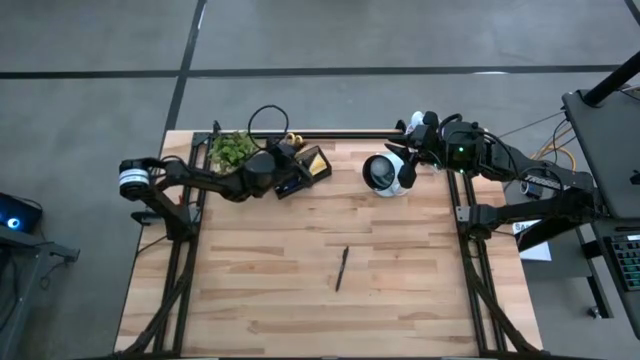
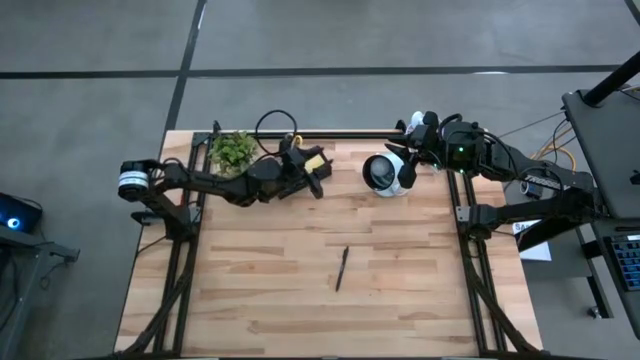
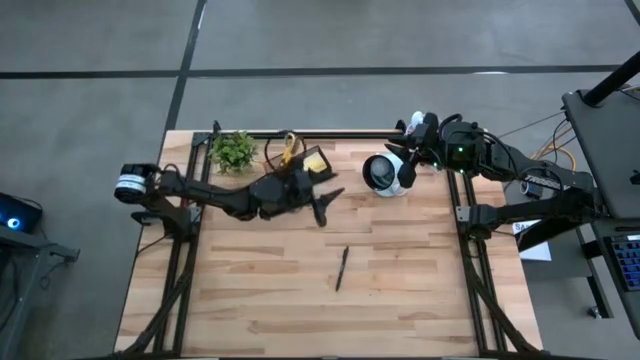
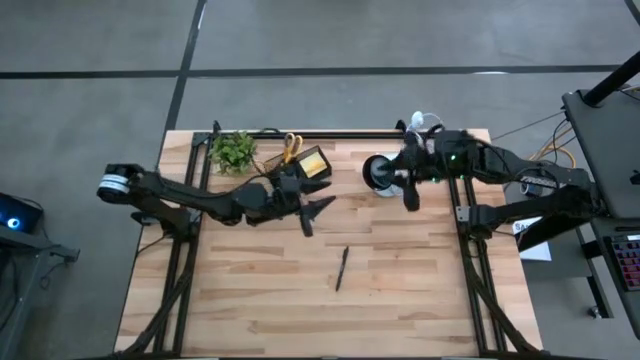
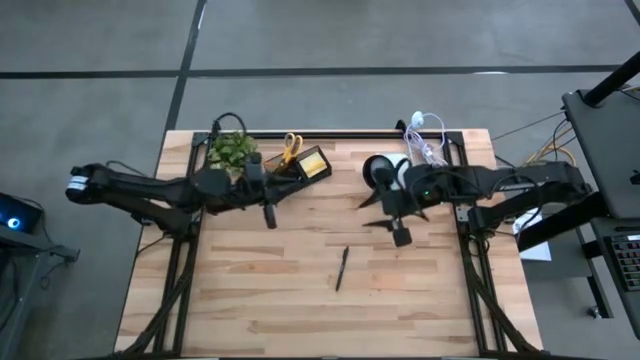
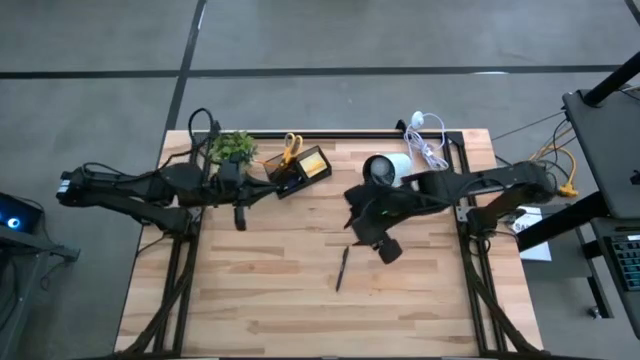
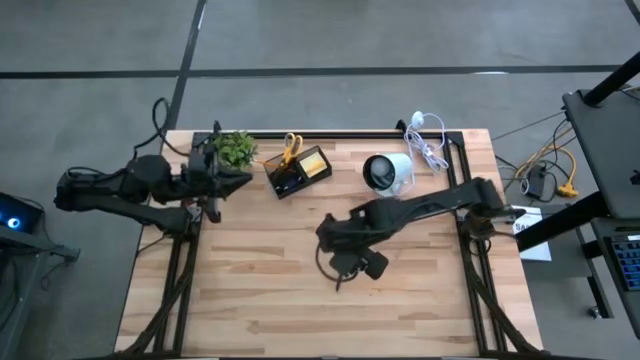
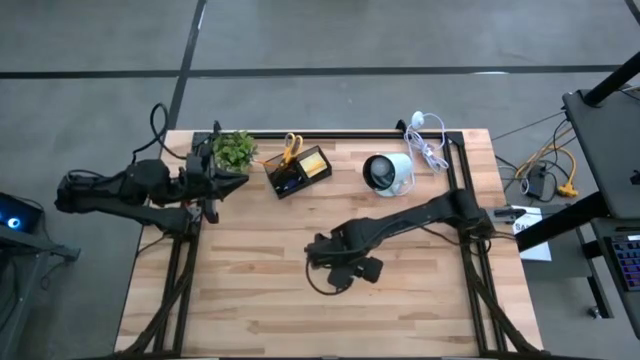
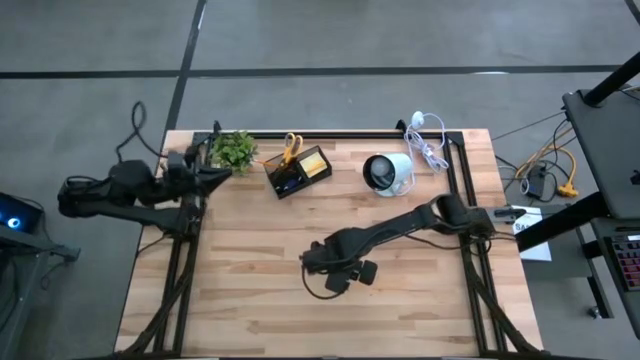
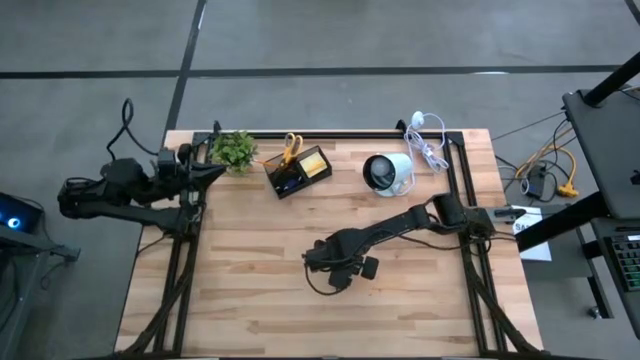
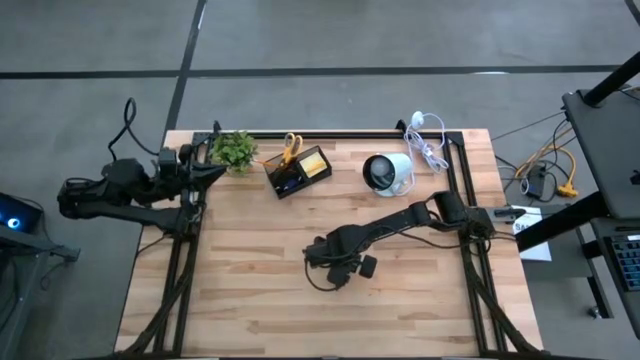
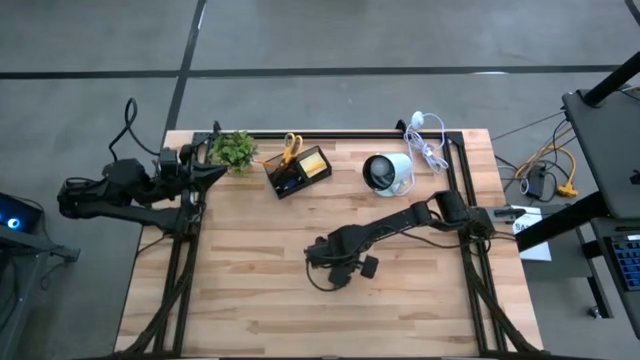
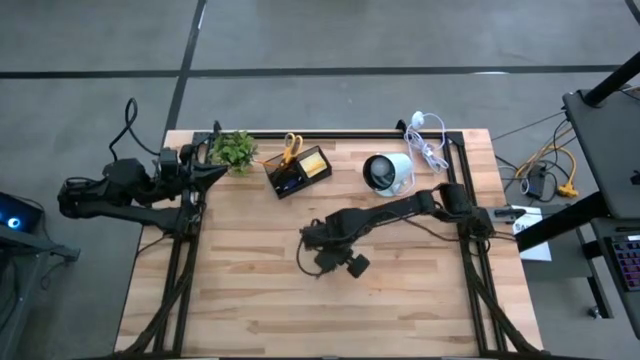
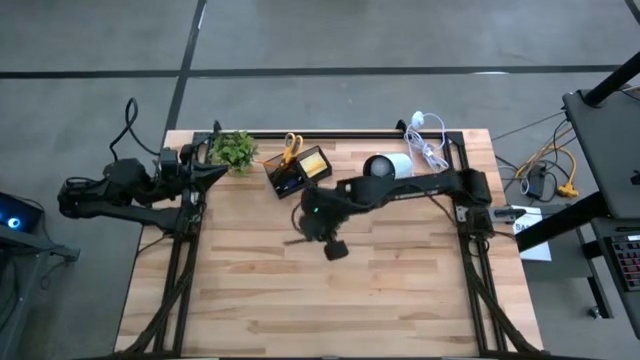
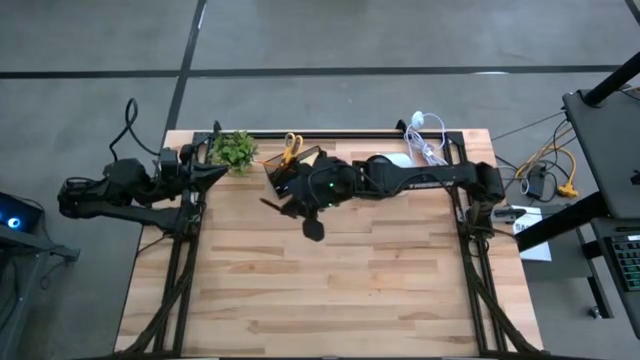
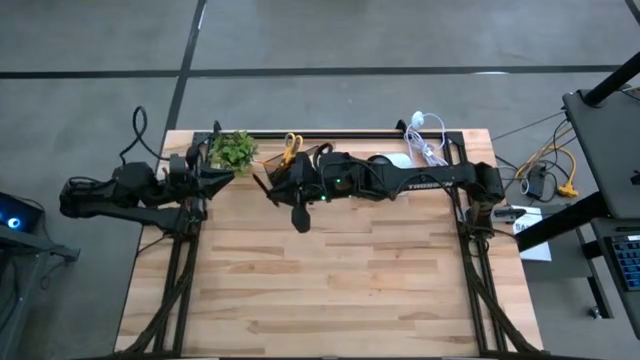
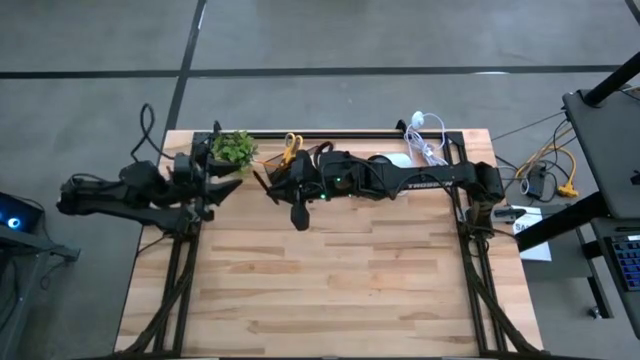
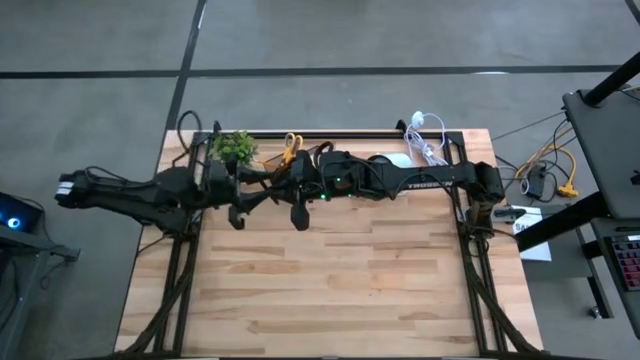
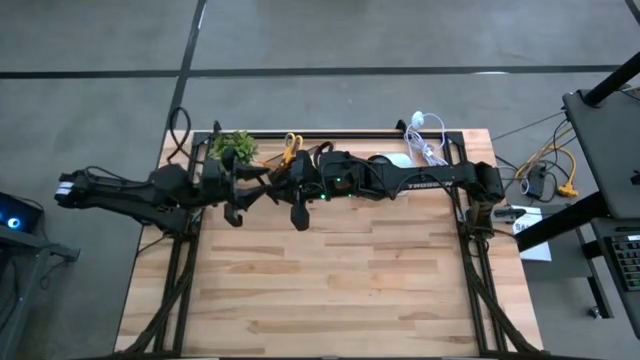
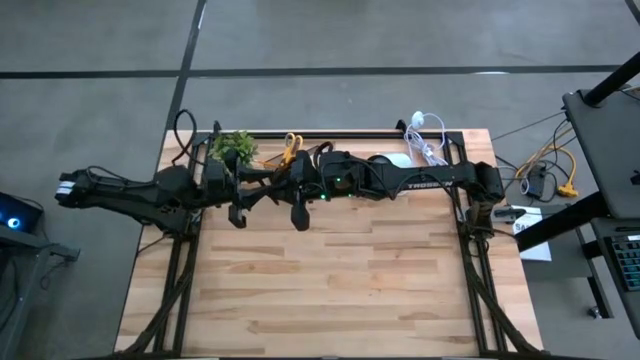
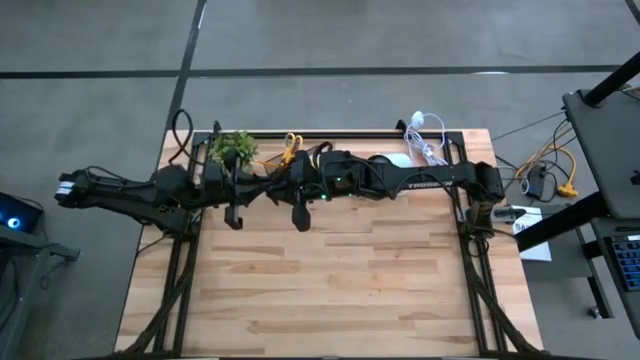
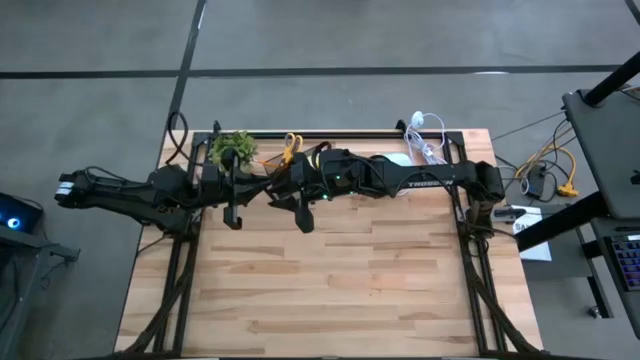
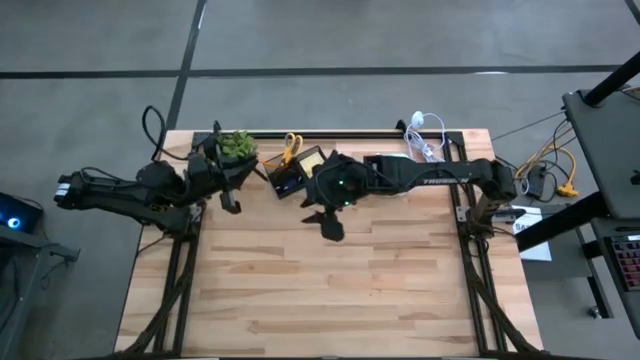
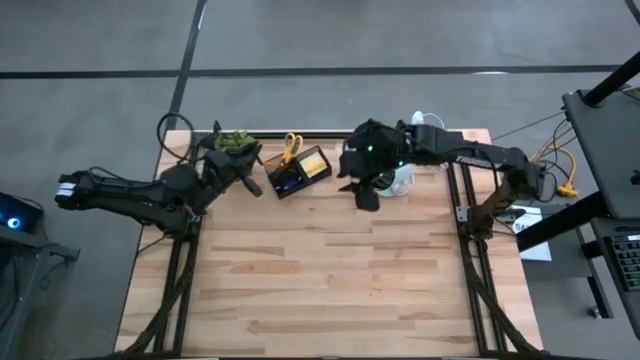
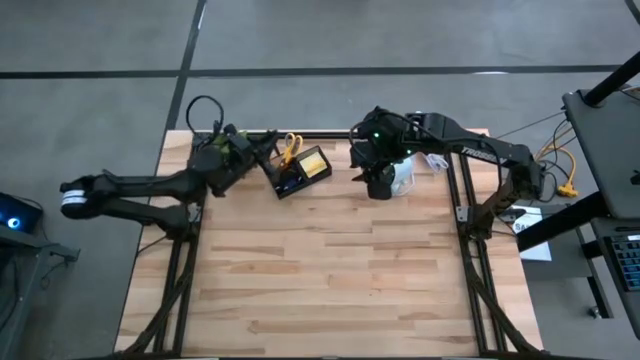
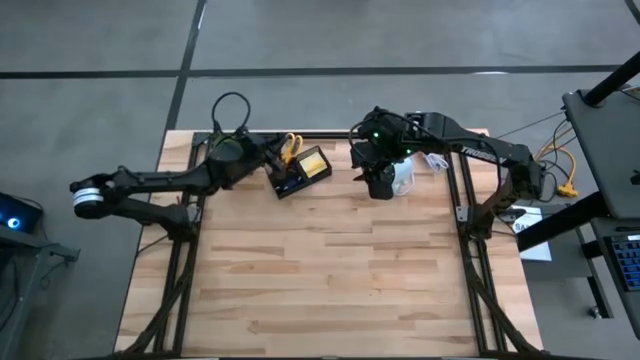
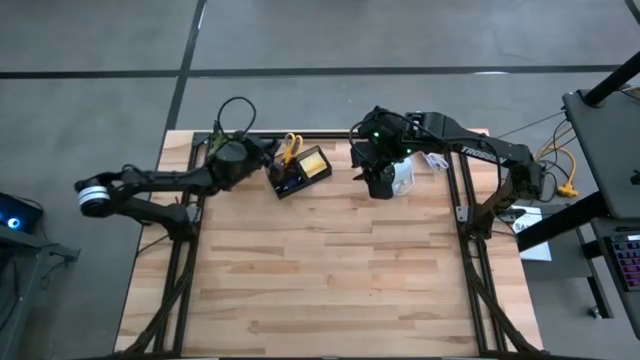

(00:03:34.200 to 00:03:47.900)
Task: Pick and place office supplies into organizer
Put the black pen into the black desk organizer

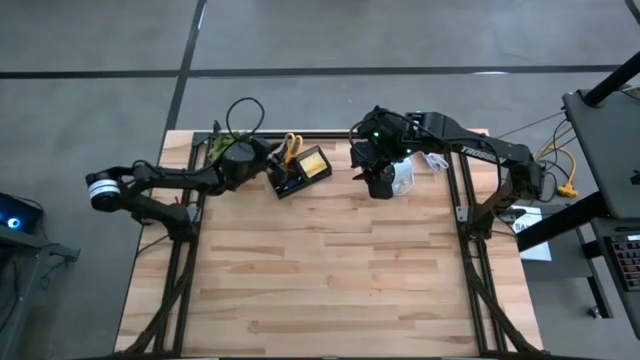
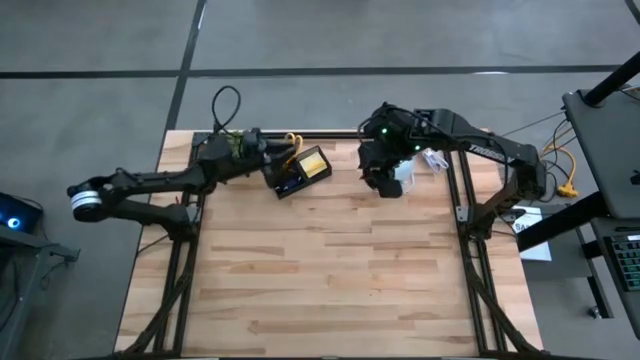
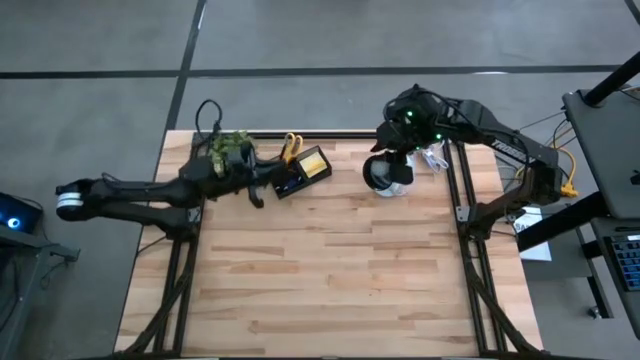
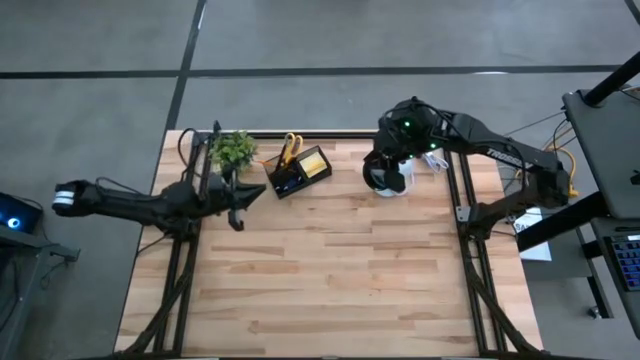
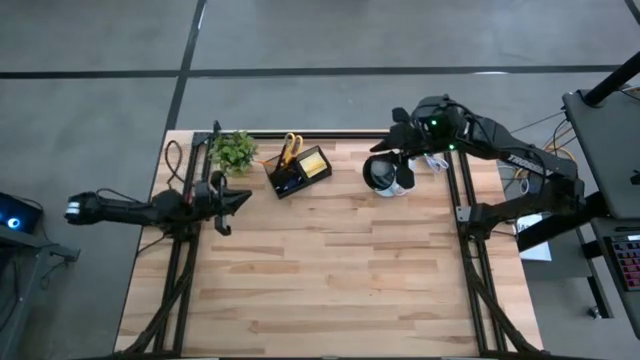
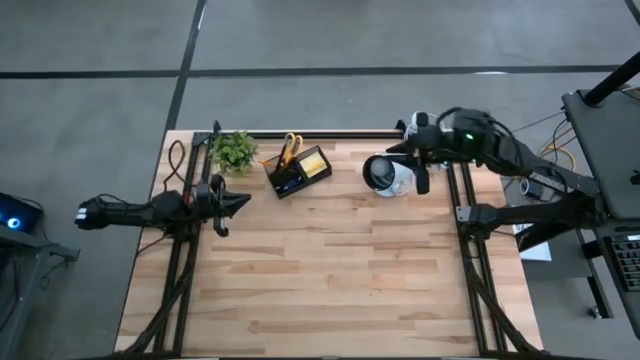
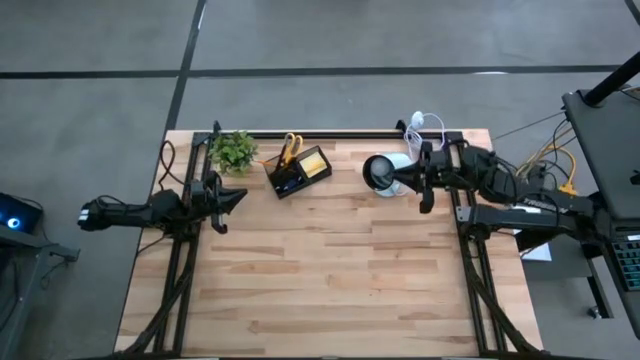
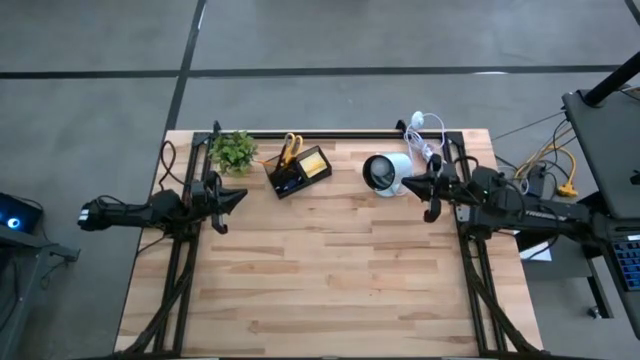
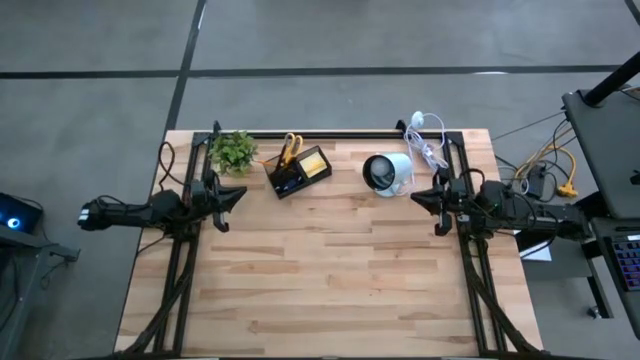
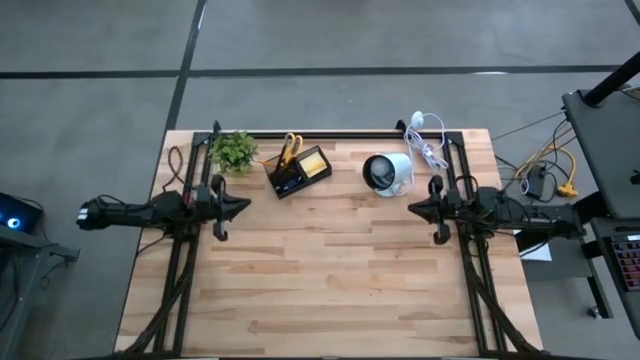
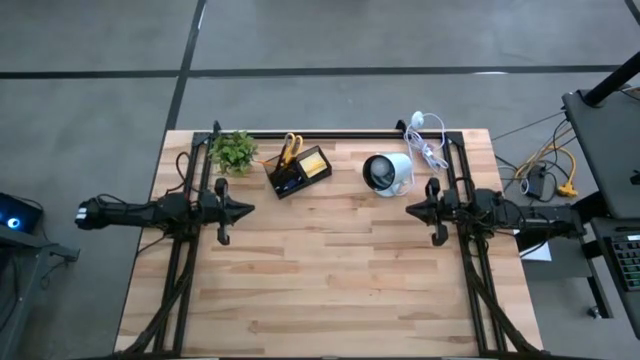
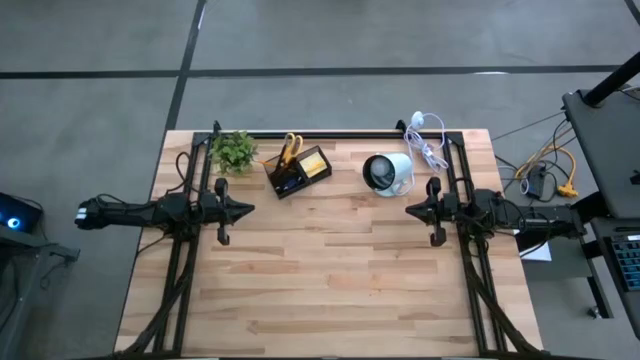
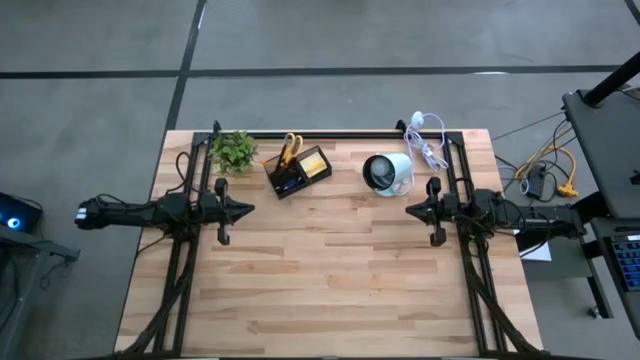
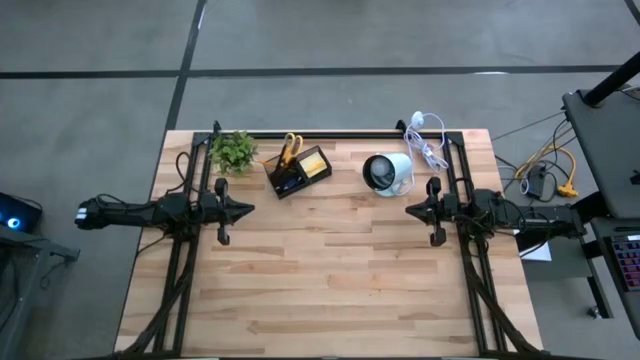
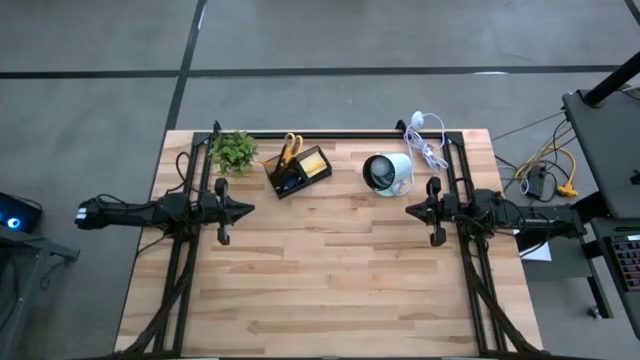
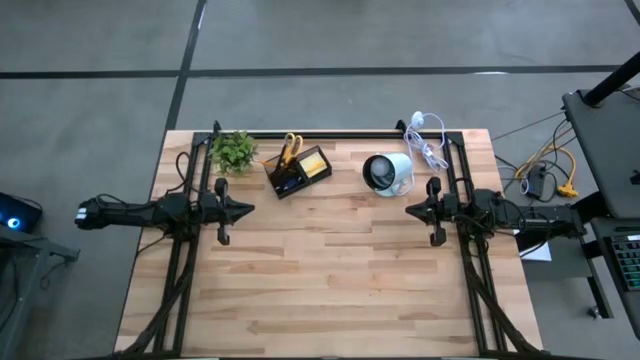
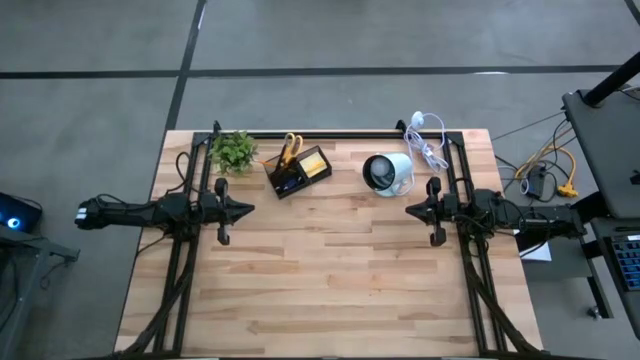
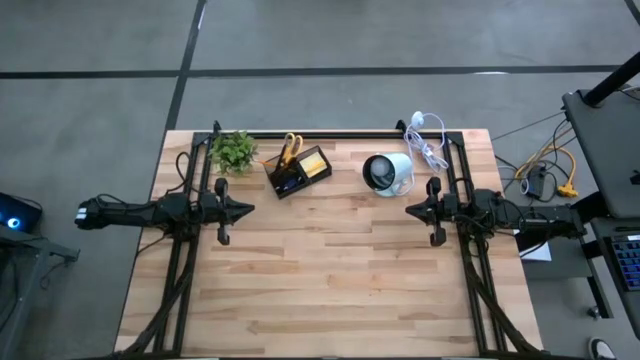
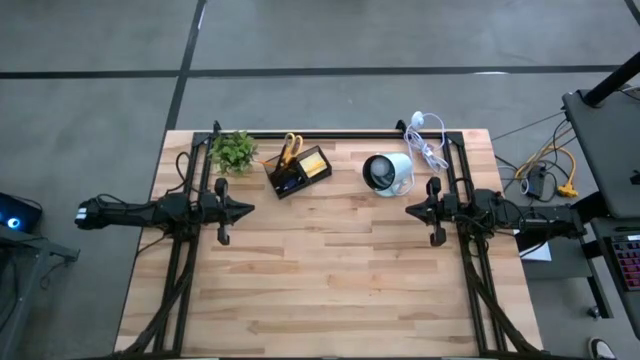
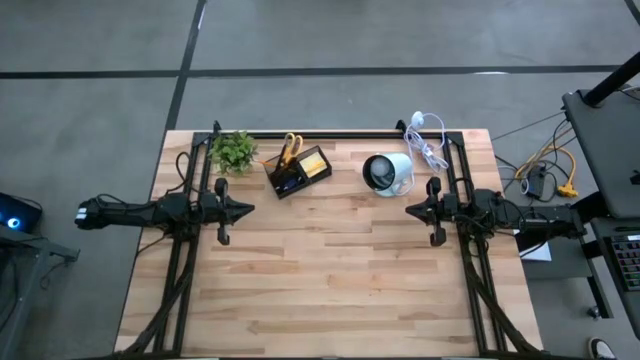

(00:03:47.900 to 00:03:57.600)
Return to Home Position
